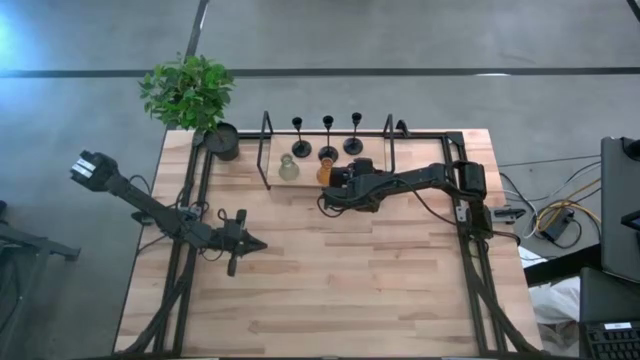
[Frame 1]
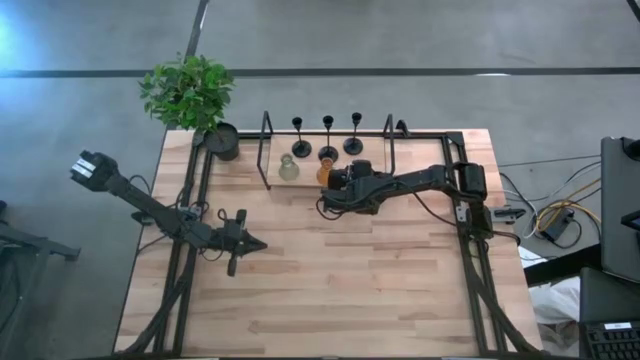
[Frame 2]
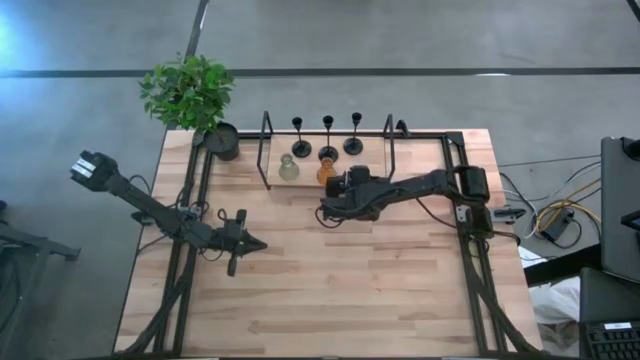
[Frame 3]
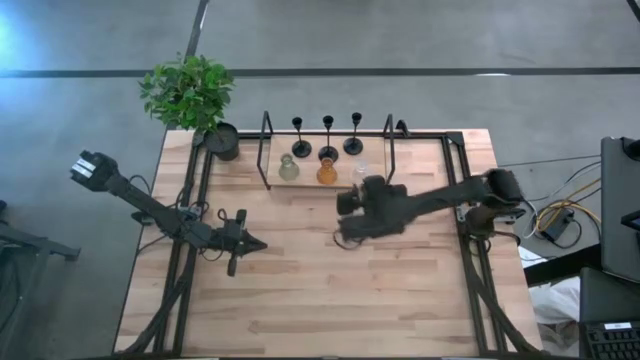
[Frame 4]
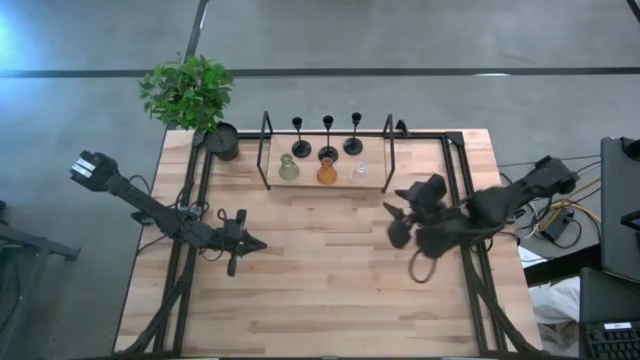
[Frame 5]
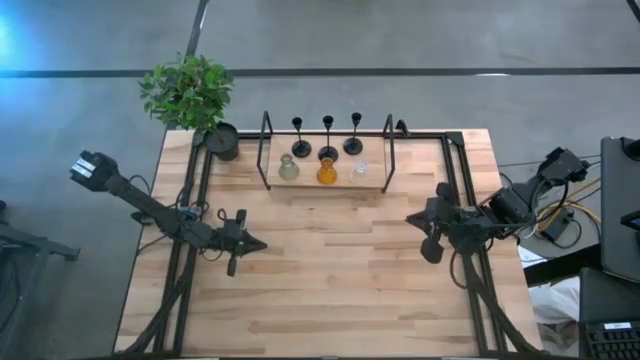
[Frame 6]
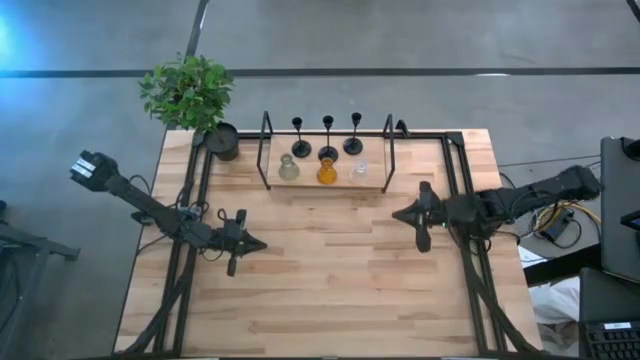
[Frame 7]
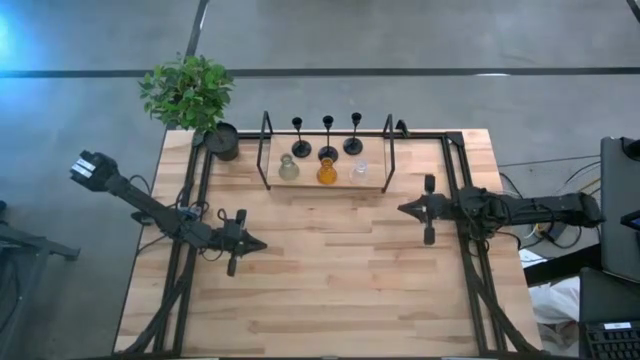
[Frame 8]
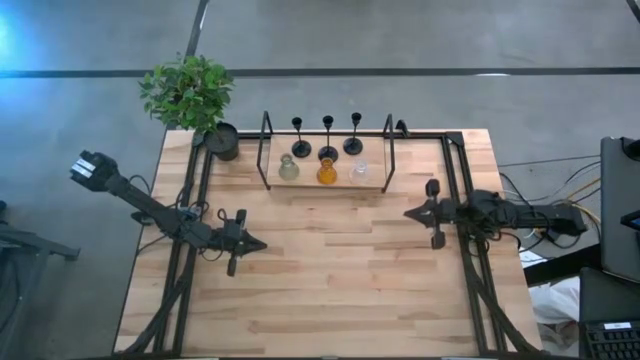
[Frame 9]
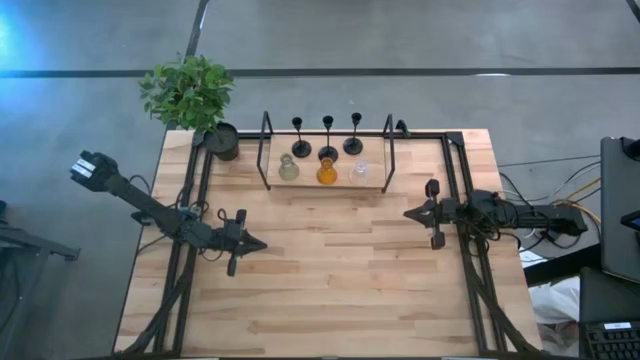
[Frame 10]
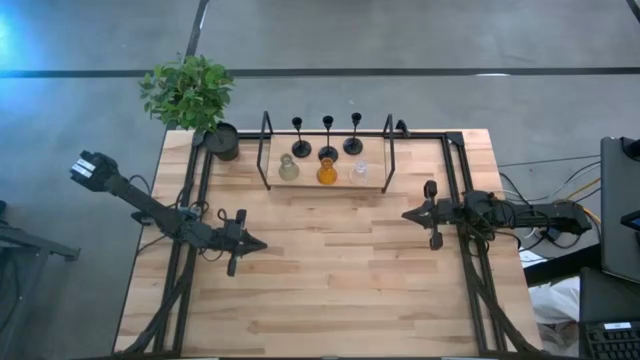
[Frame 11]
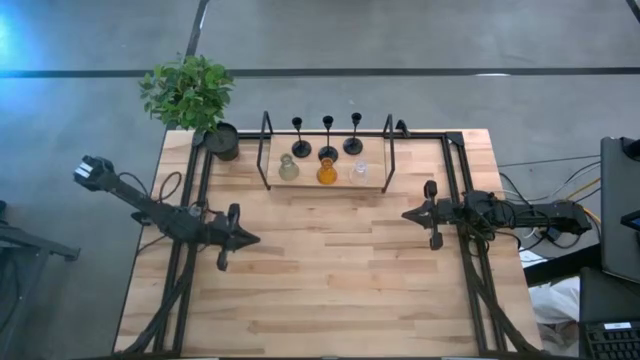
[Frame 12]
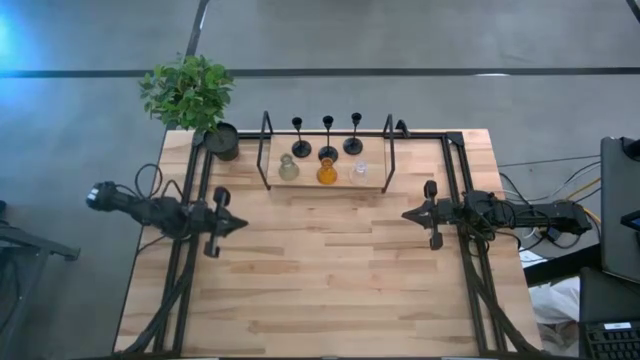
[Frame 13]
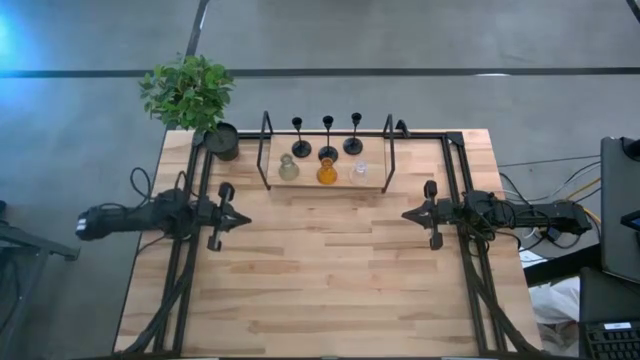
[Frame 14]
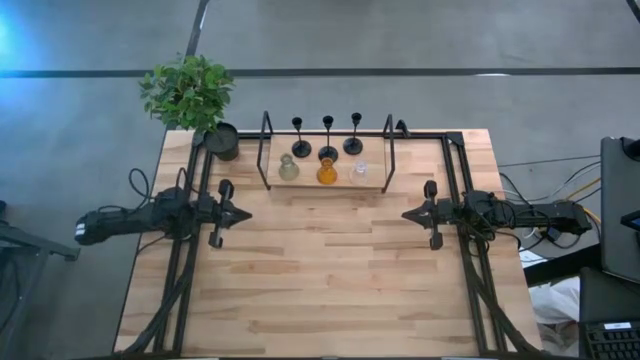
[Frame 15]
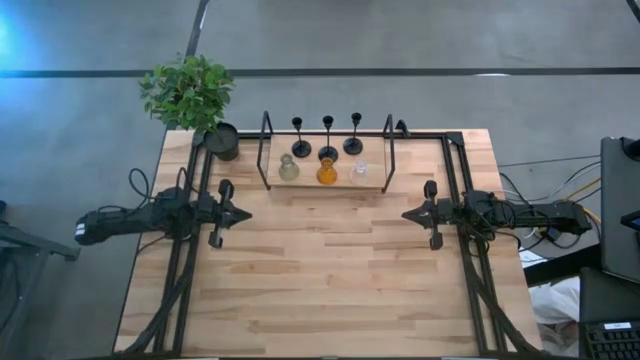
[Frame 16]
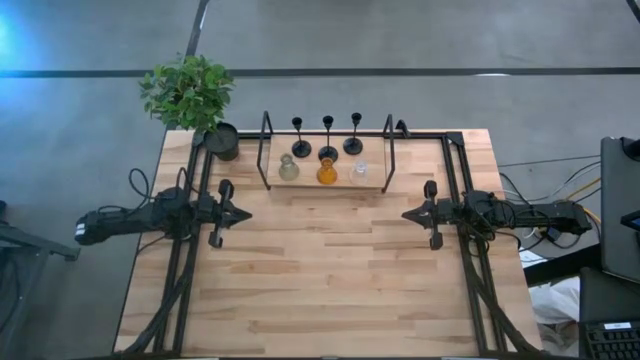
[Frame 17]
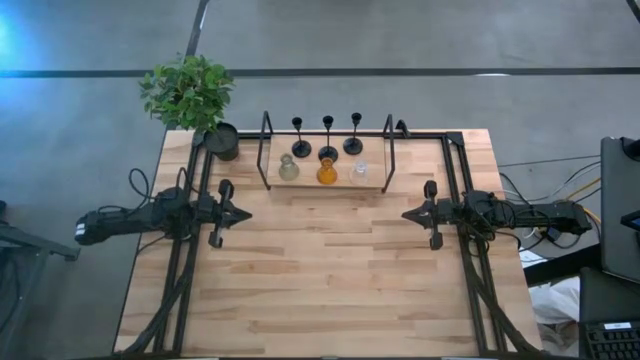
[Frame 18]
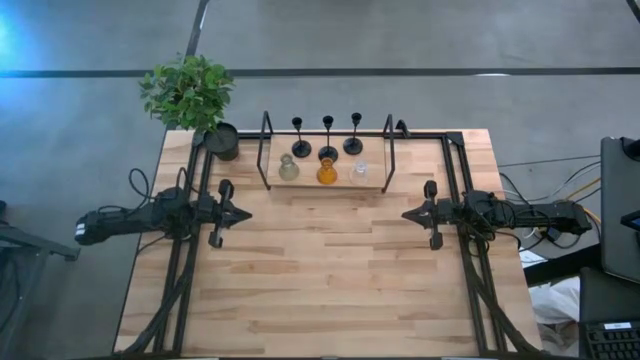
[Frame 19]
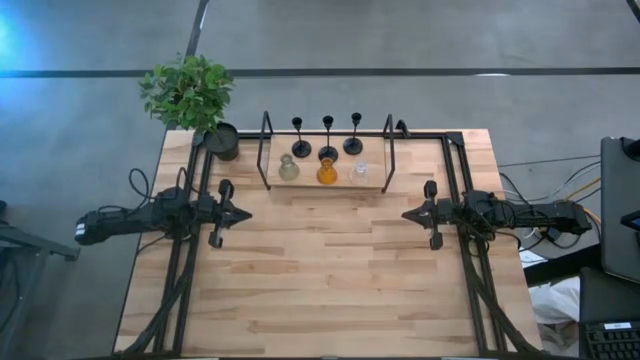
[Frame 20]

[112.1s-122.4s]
Task: Pick & Place candle stick holders
Return to Home Position

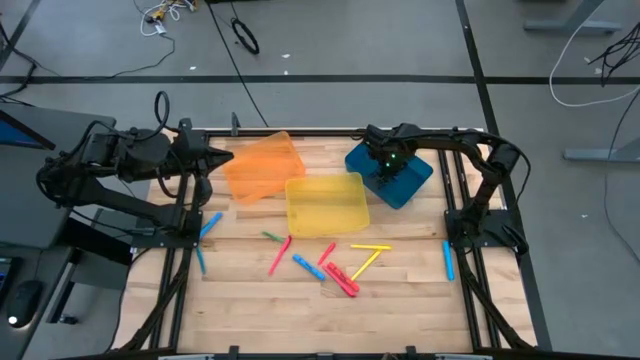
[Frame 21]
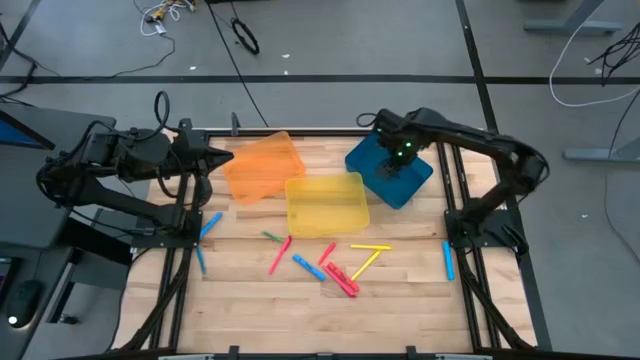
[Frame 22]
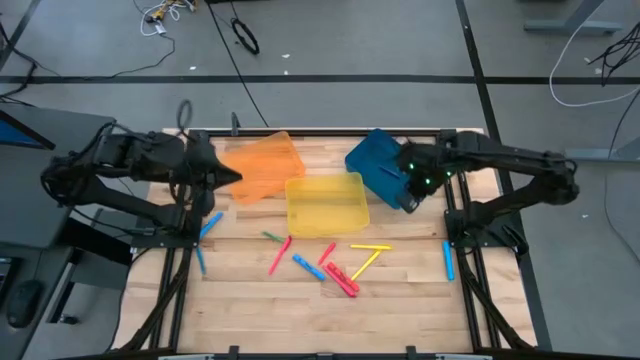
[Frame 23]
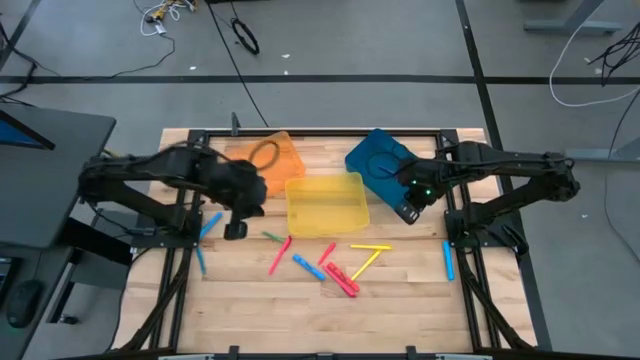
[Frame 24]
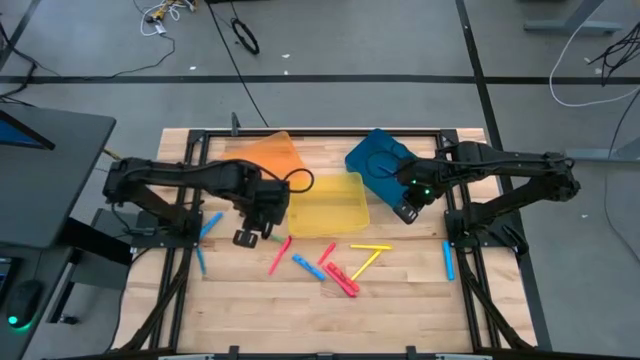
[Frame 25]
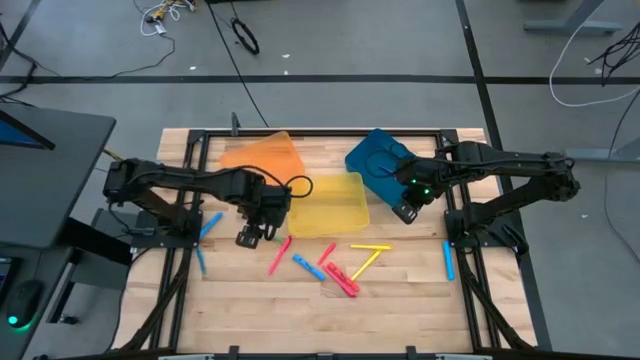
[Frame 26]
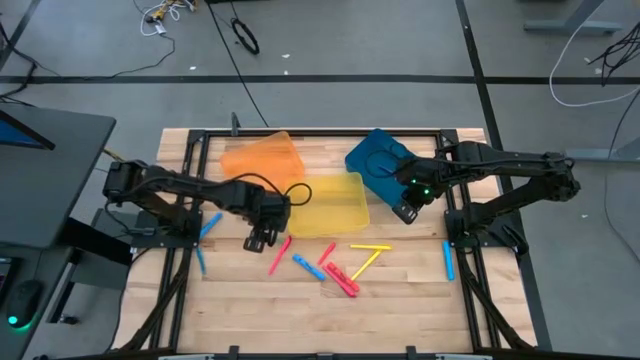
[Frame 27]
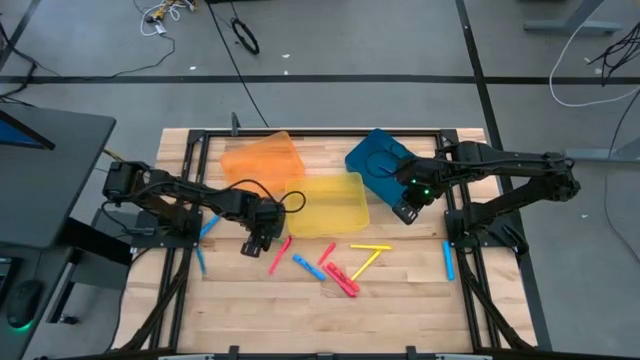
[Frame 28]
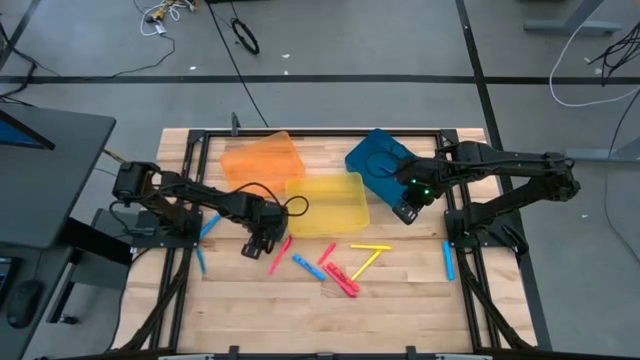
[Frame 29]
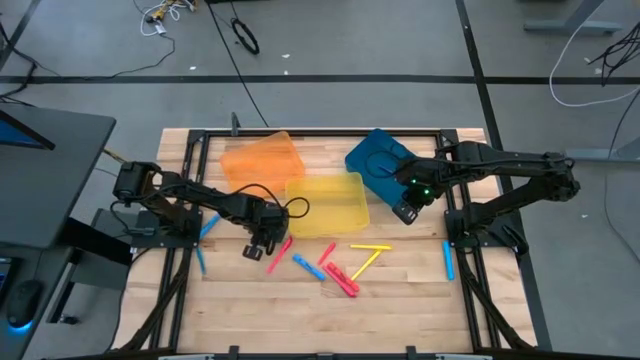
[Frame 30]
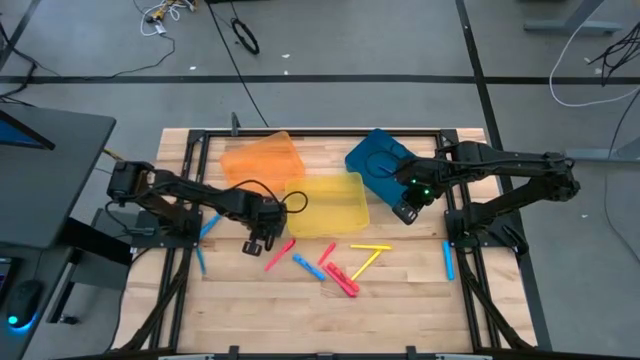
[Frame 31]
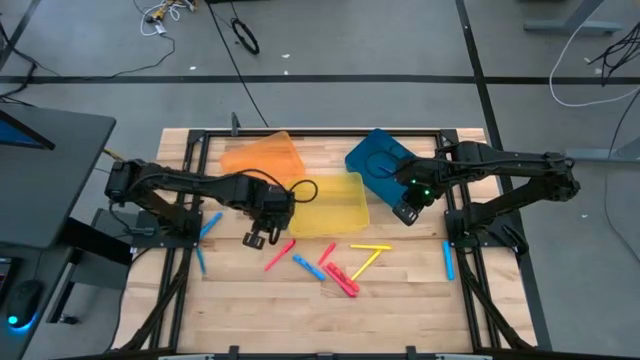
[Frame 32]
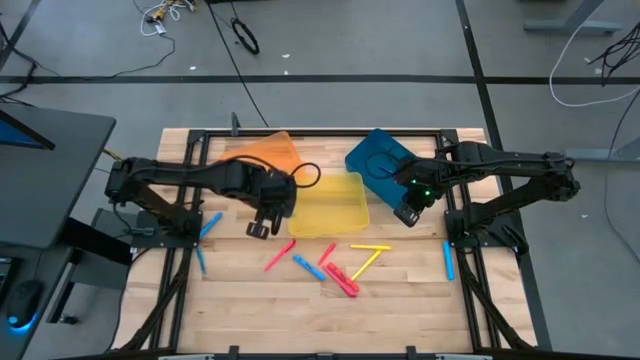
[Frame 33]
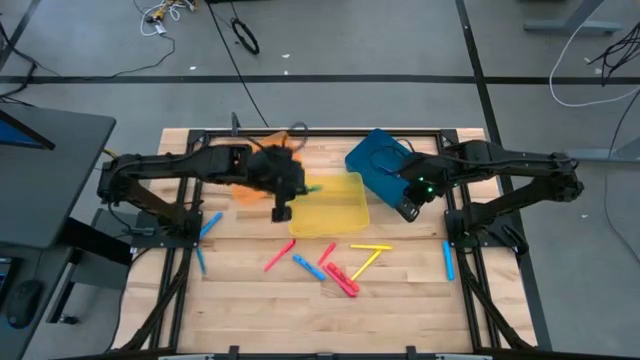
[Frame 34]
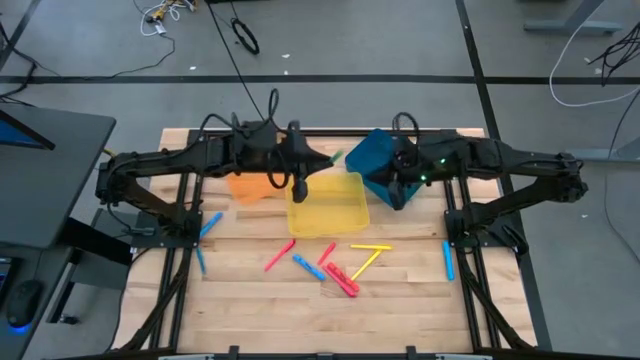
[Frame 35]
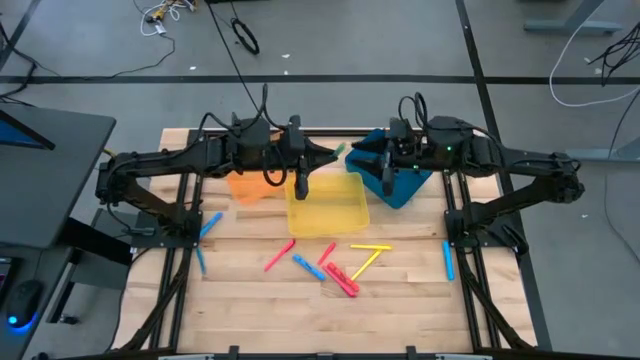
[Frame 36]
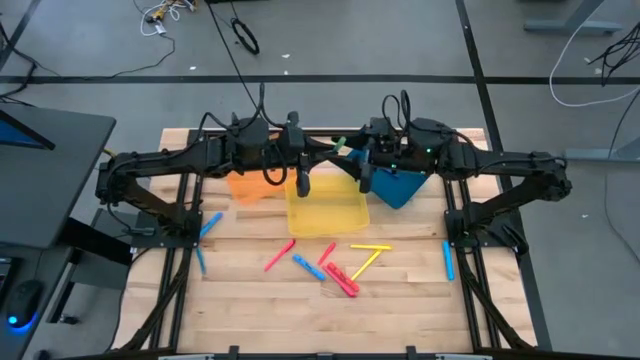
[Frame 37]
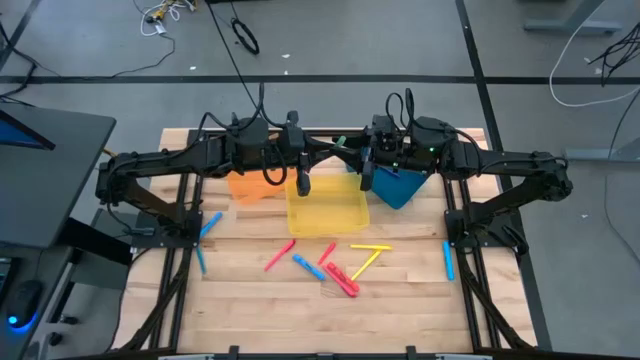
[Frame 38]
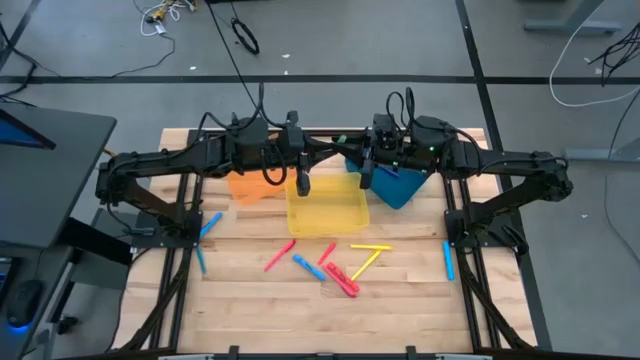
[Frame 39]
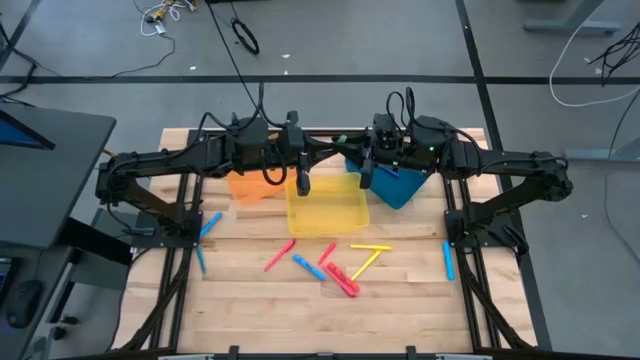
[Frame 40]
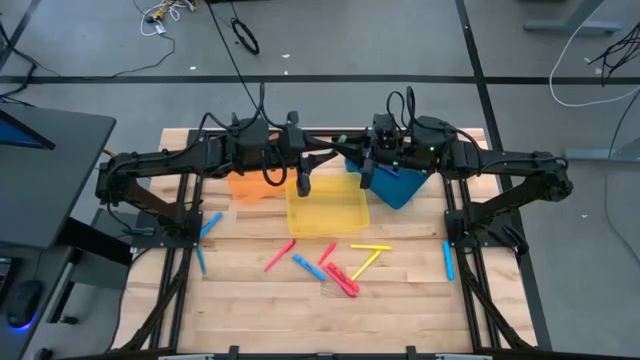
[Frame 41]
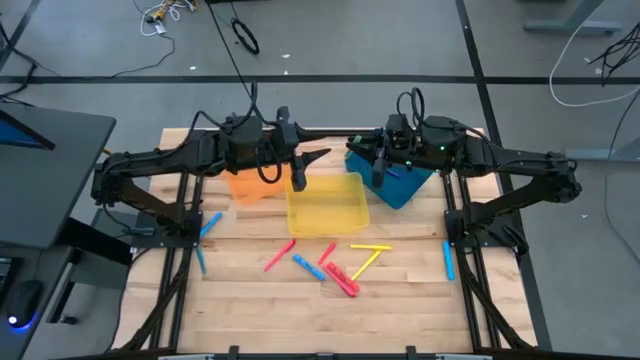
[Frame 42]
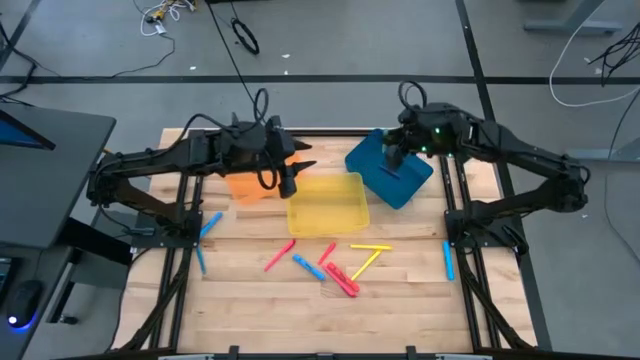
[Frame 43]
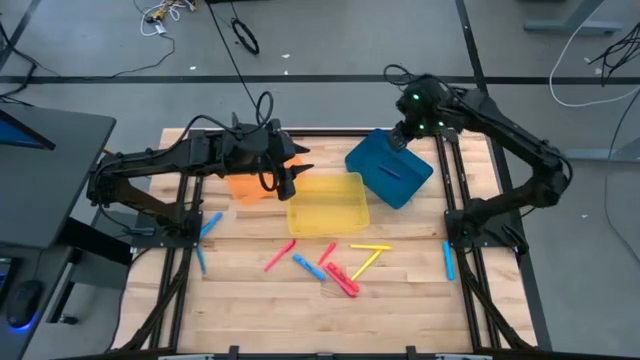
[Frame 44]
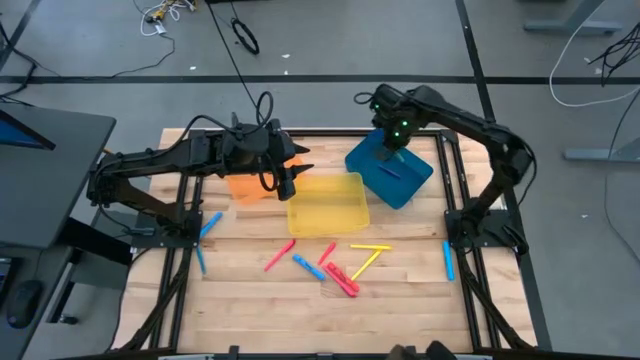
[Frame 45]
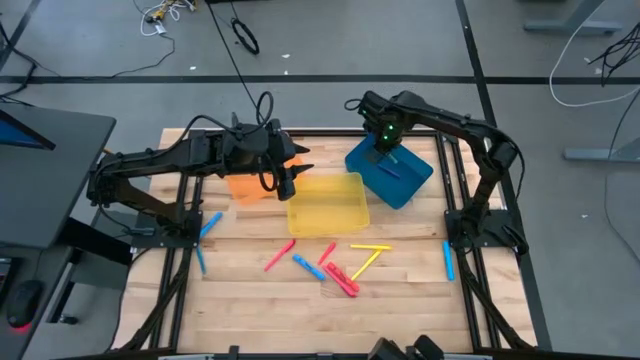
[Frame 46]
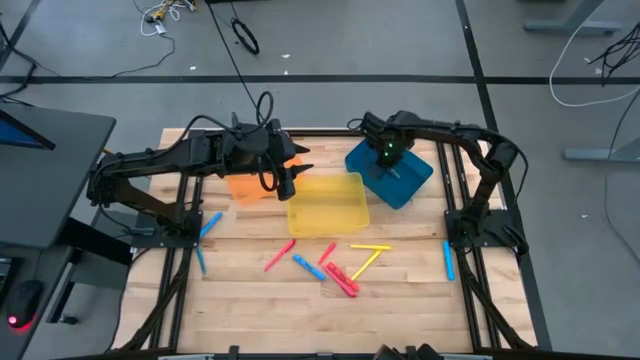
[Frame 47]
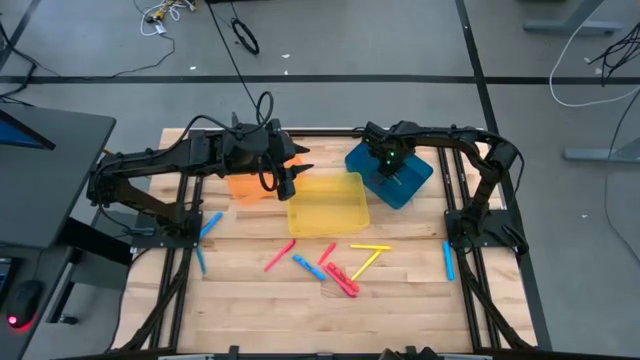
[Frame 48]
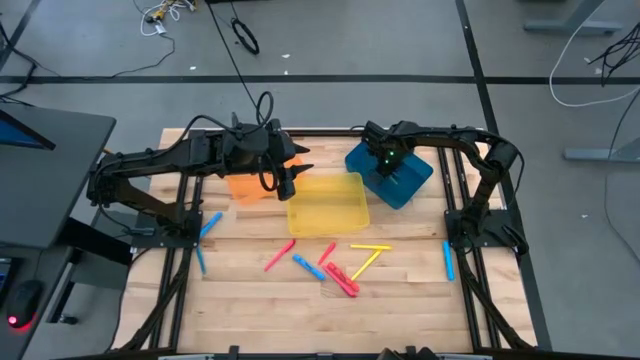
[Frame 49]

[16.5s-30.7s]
Task: Pick & Place Markers
Put the green pen into the blue bin
